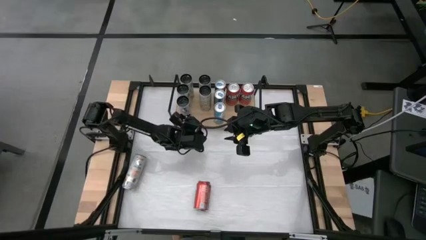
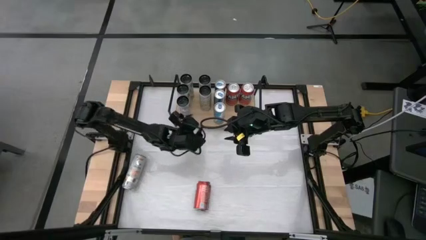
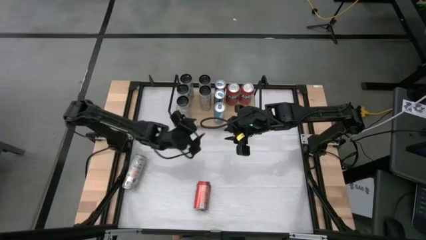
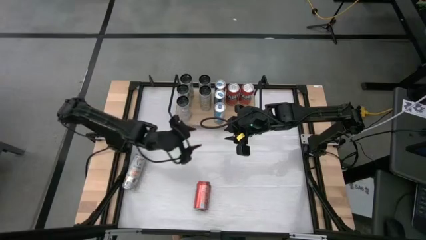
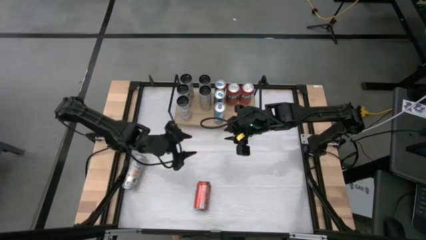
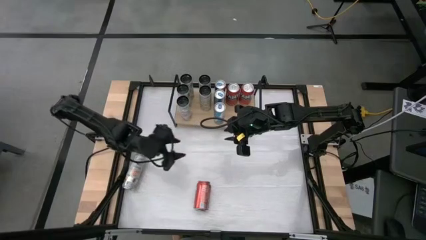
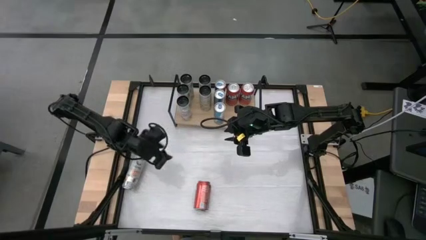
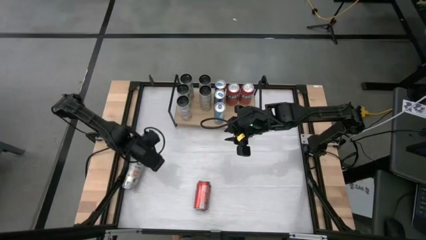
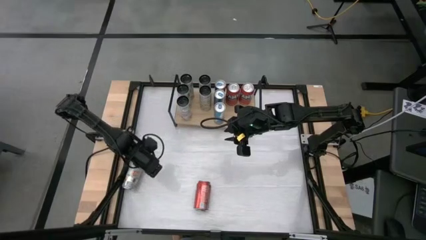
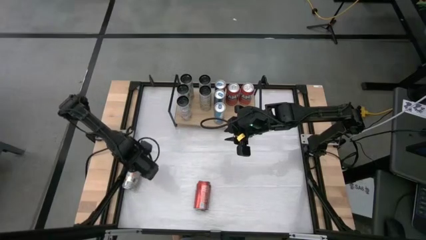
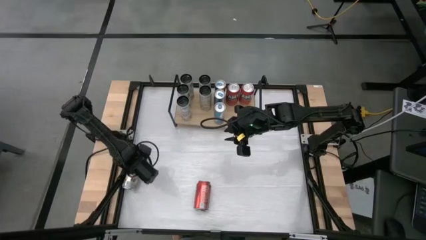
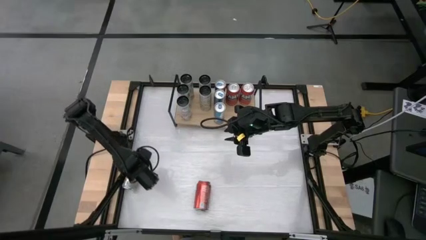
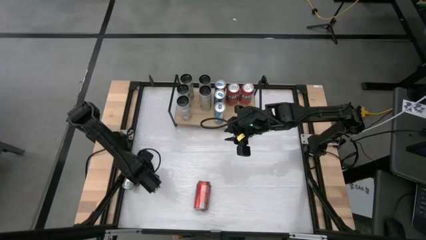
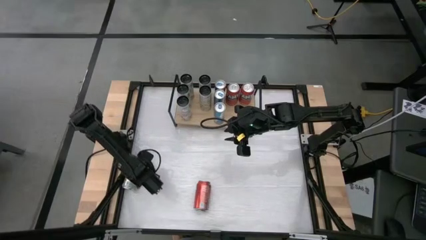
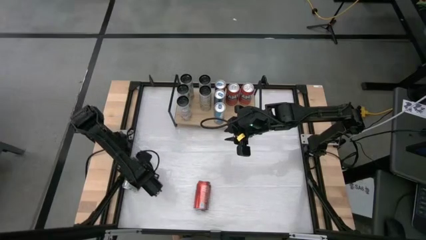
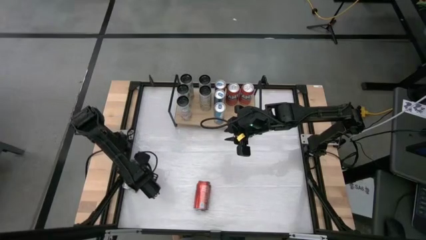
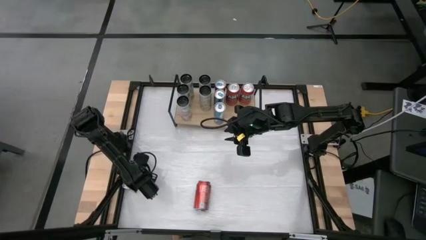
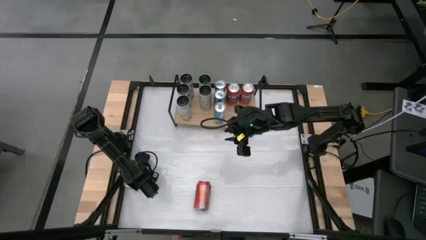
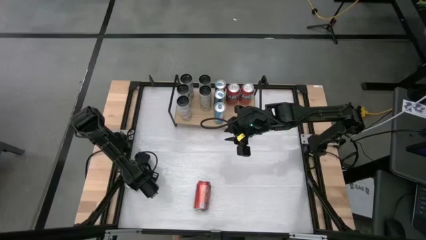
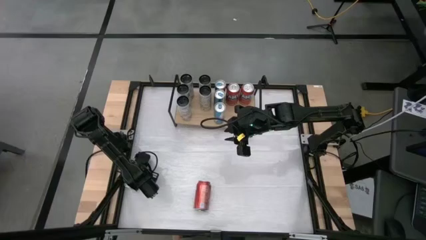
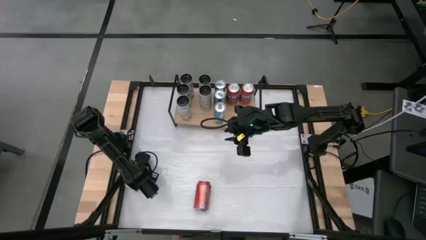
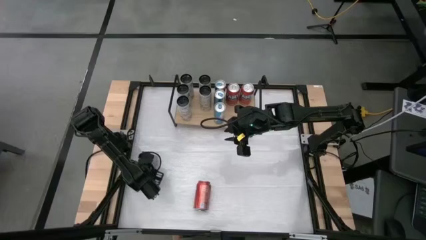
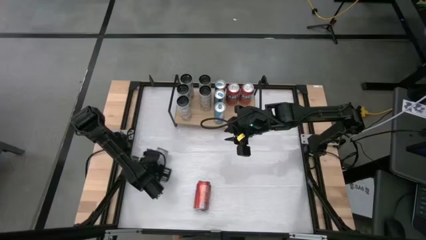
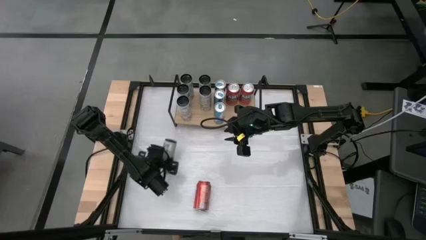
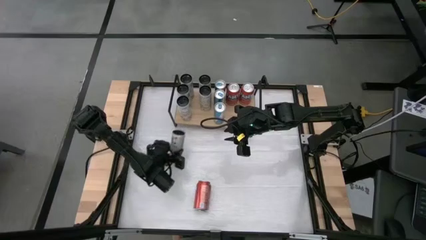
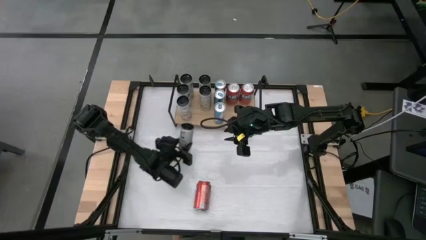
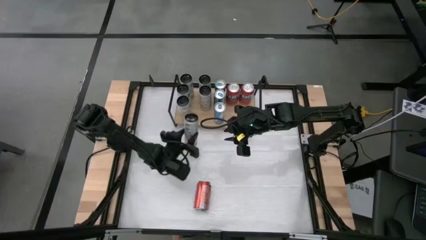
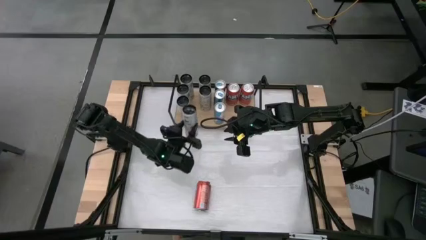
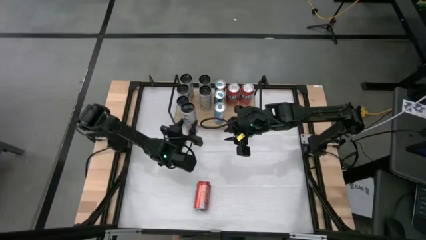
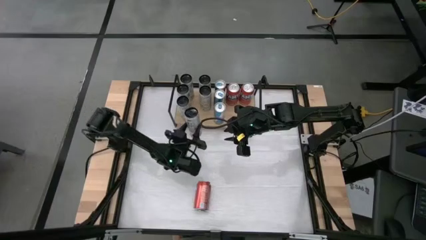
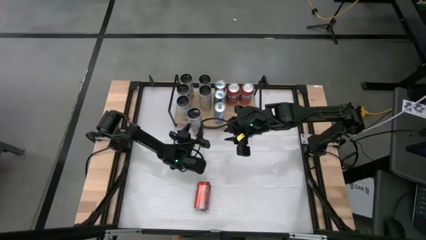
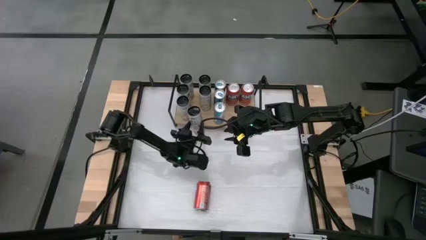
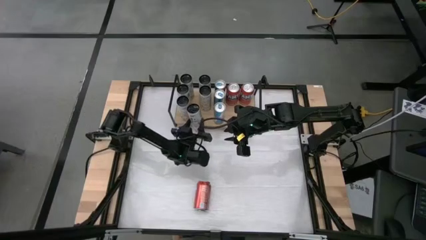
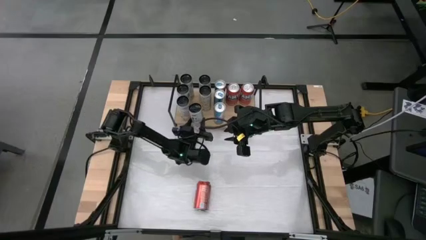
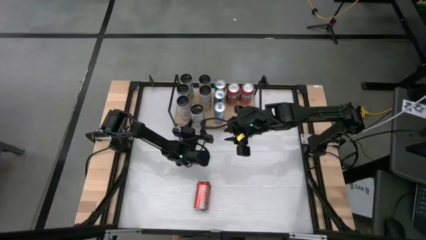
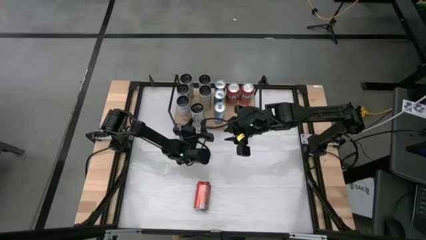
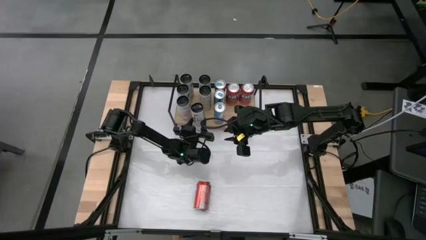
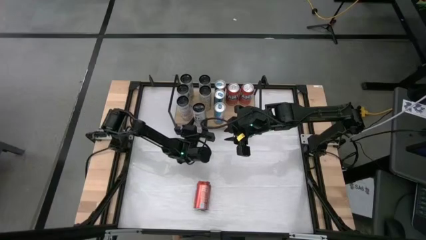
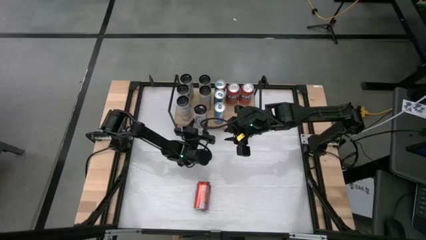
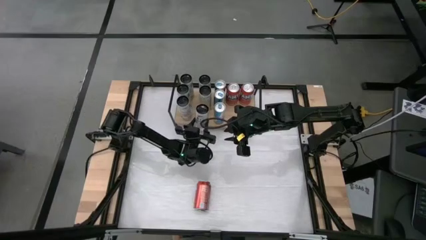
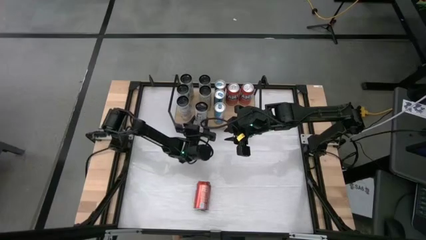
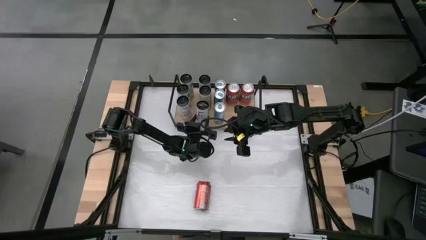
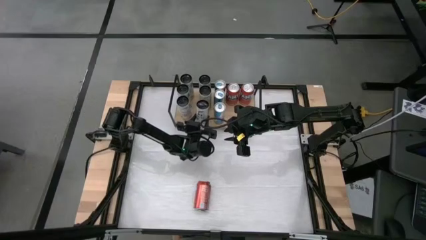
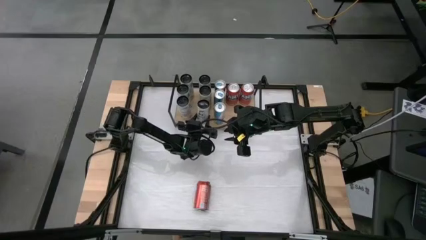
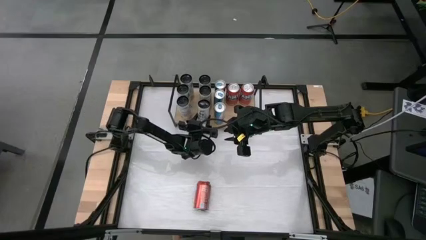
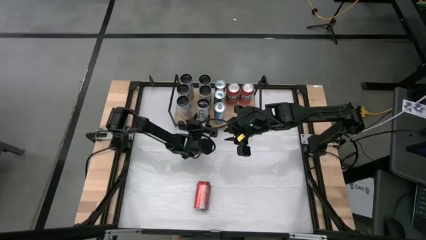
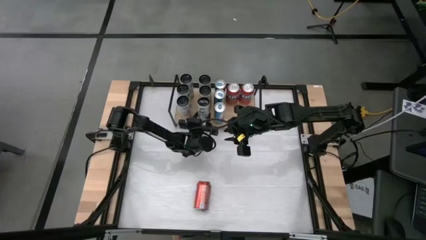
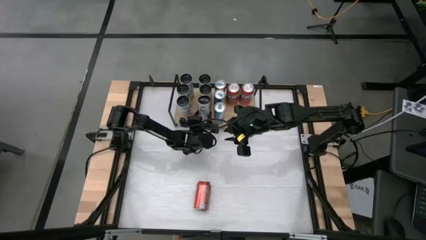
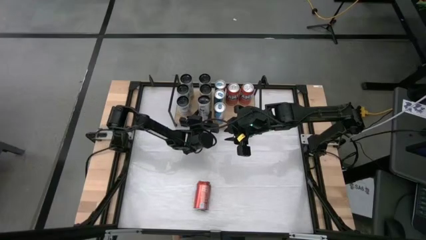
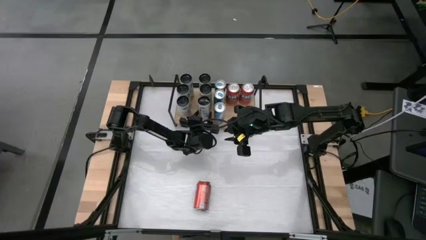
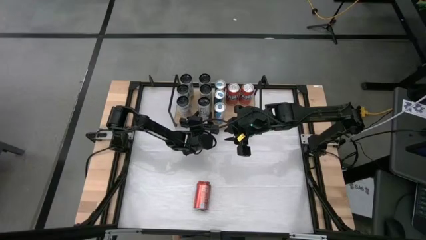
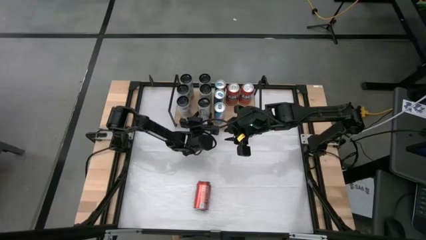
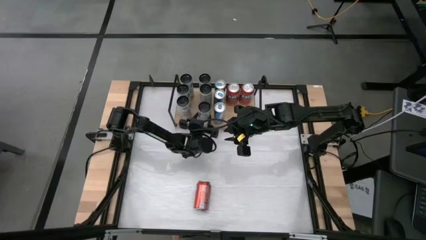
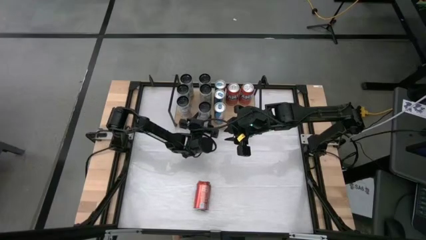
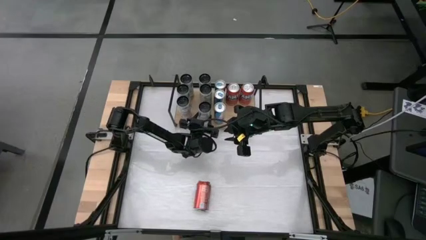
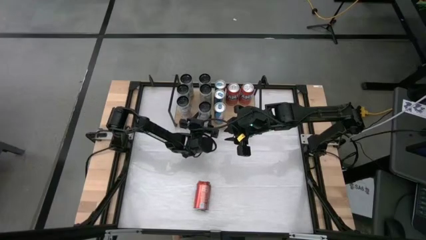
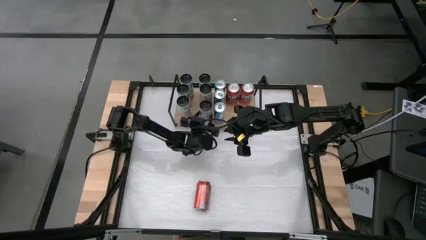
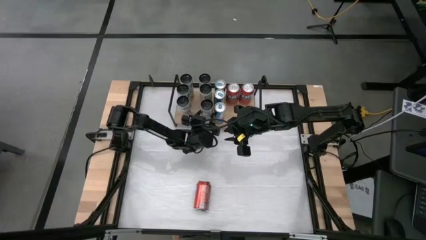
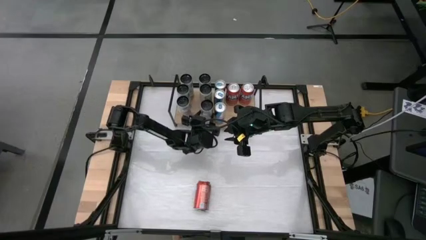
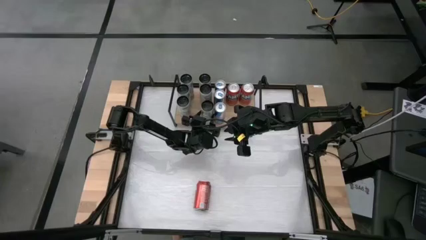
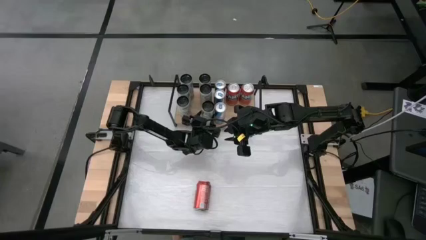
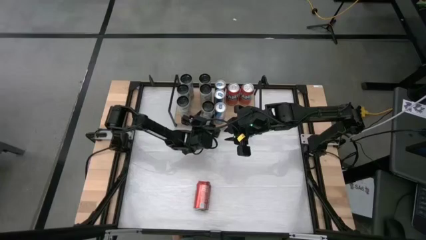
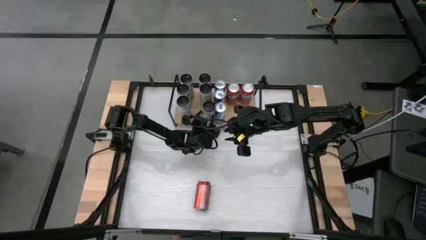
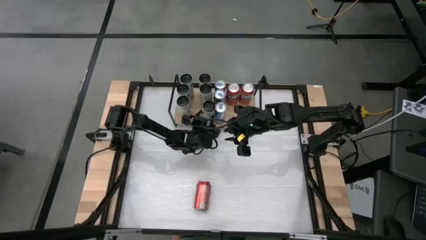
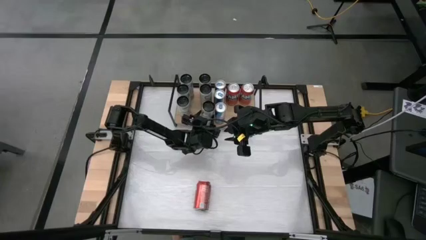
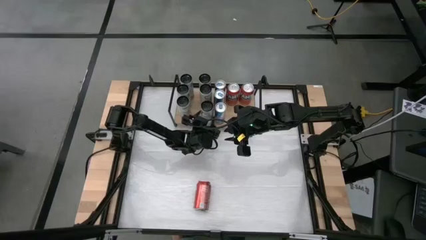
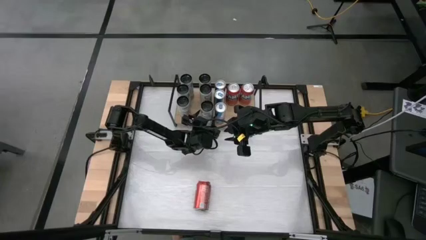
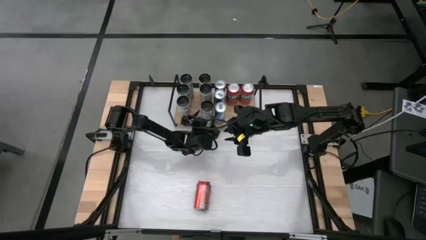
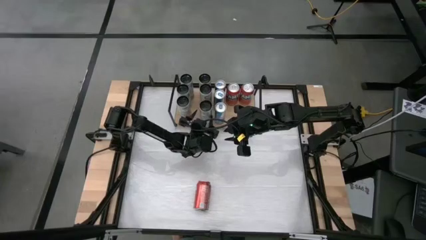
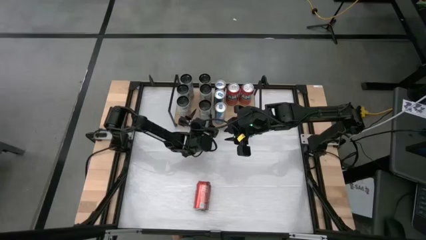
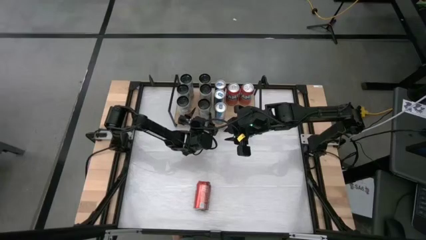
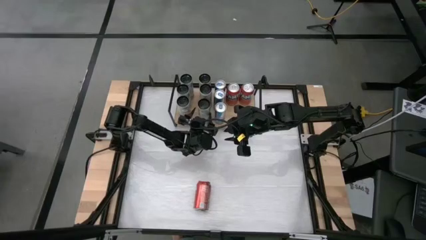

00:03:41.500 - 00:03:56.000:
Task: Place canned beverage on shelf
Put the white yellow soda can on the shelf aligned with the other white yellow soda cans
